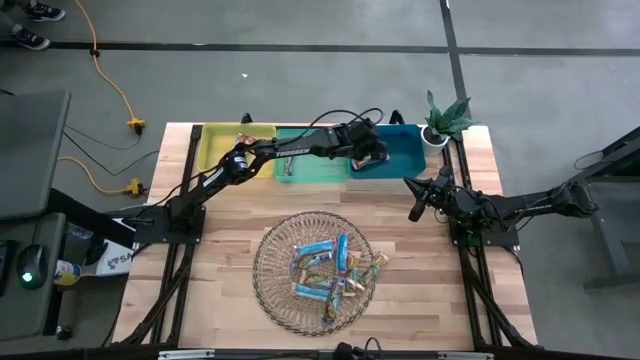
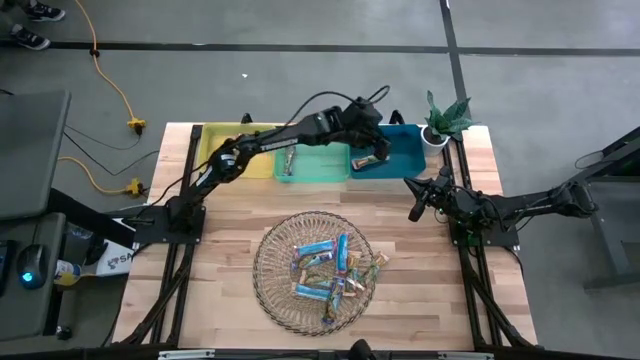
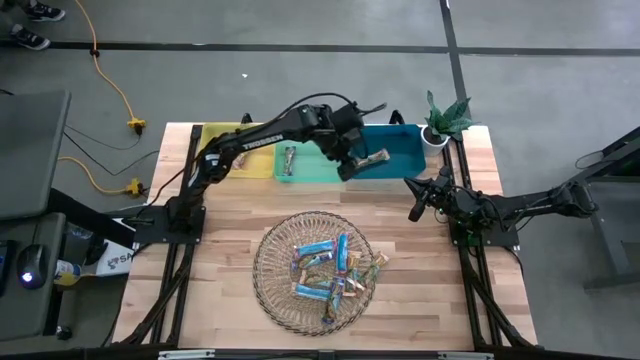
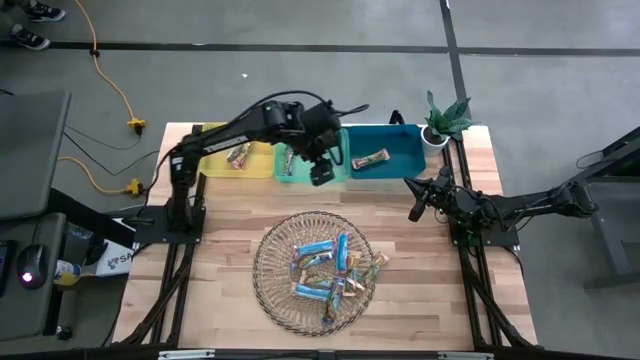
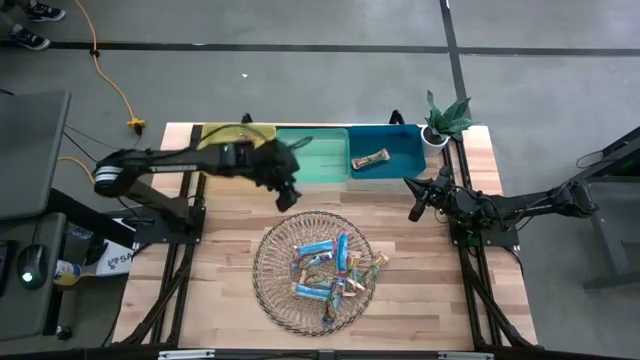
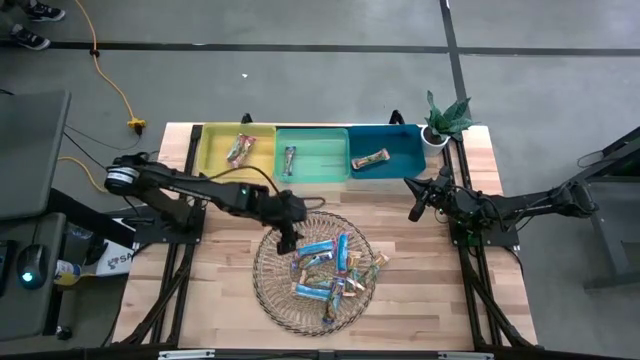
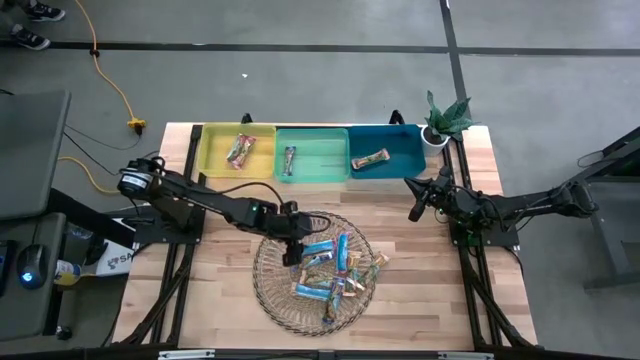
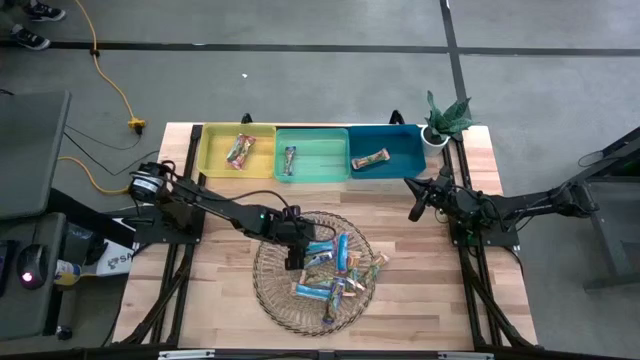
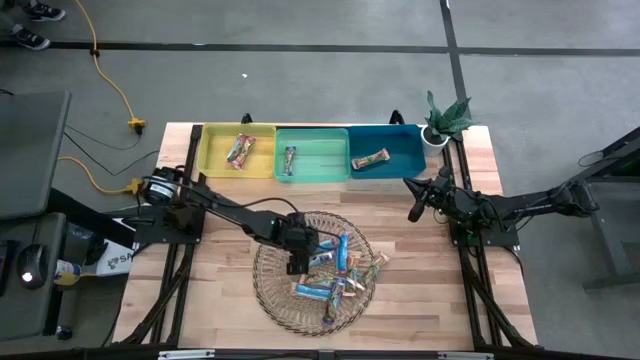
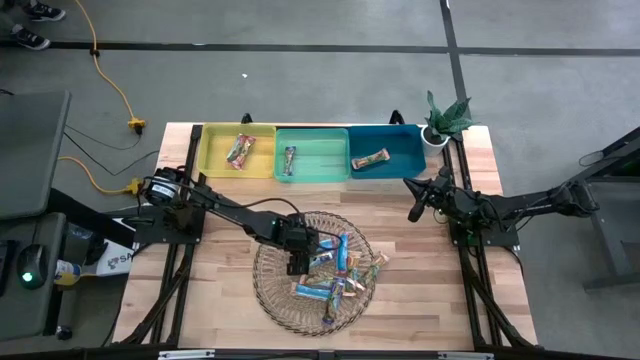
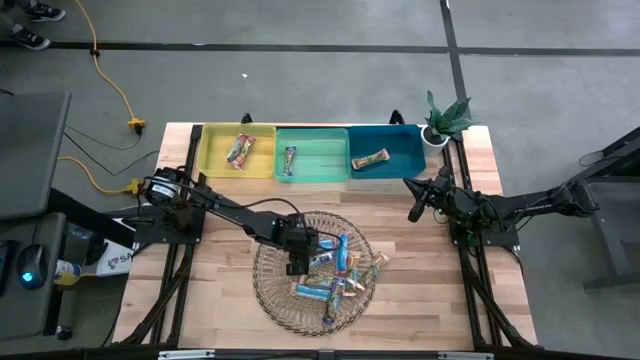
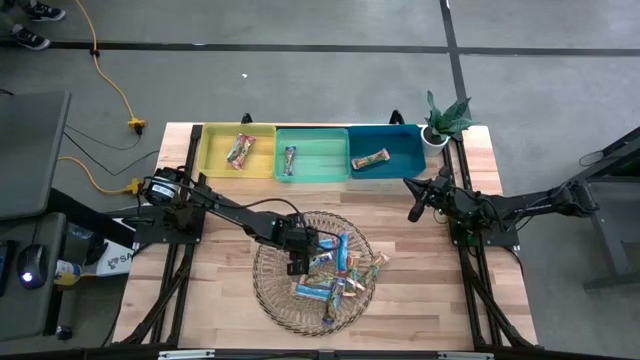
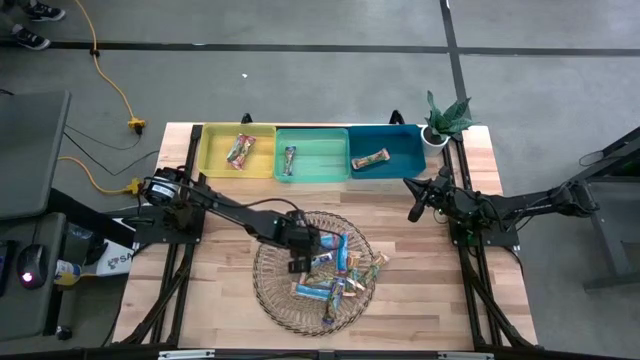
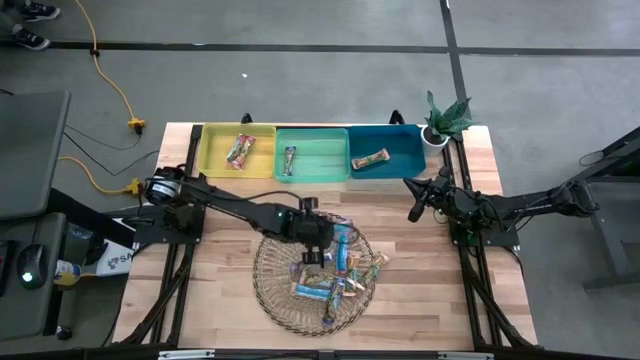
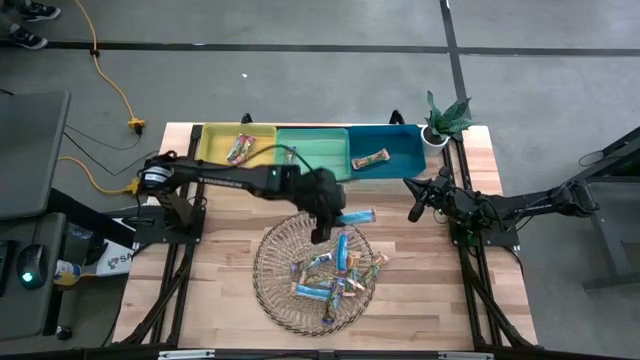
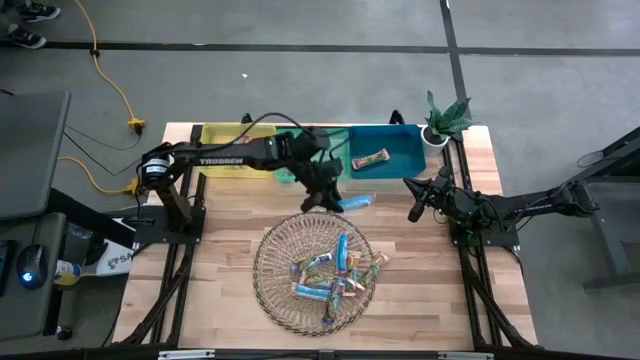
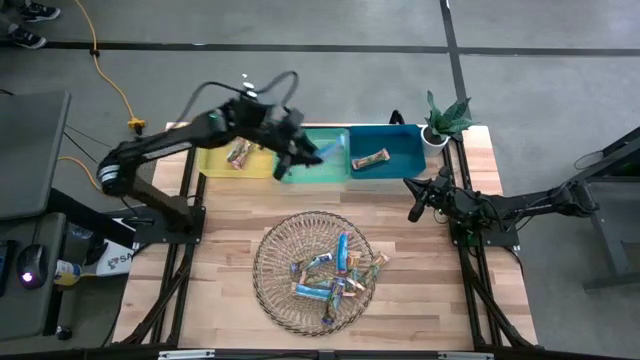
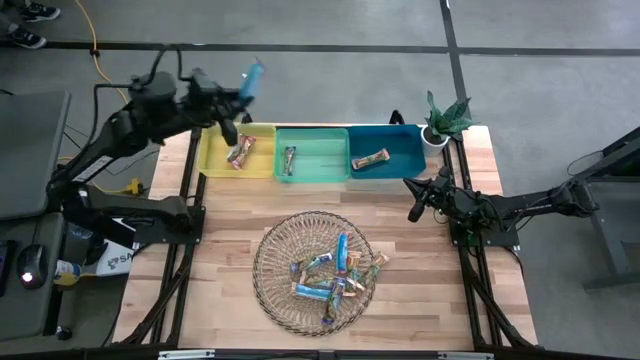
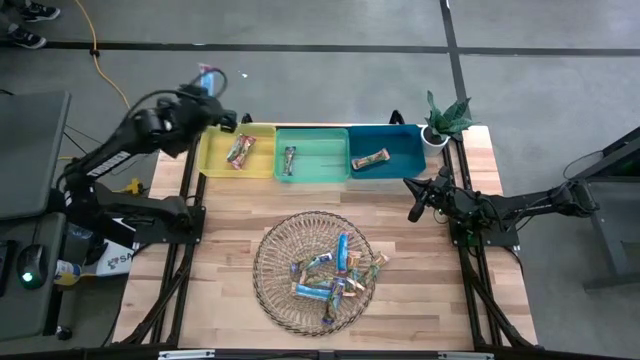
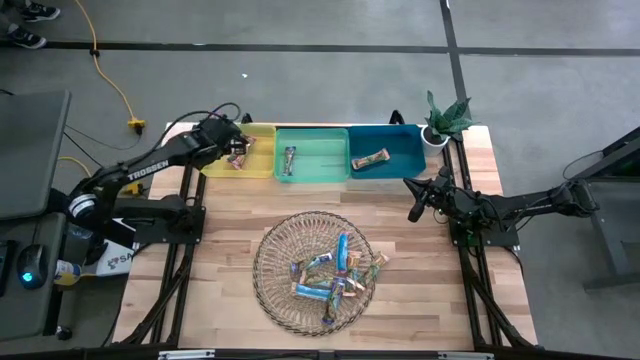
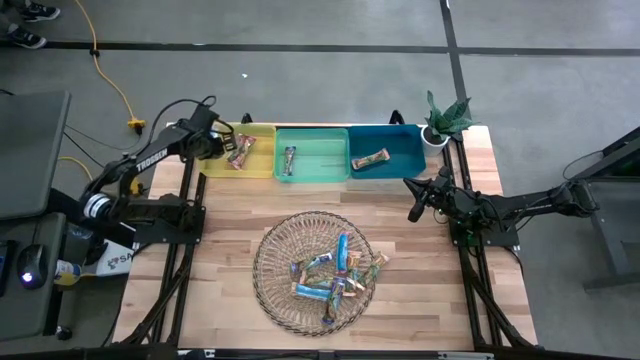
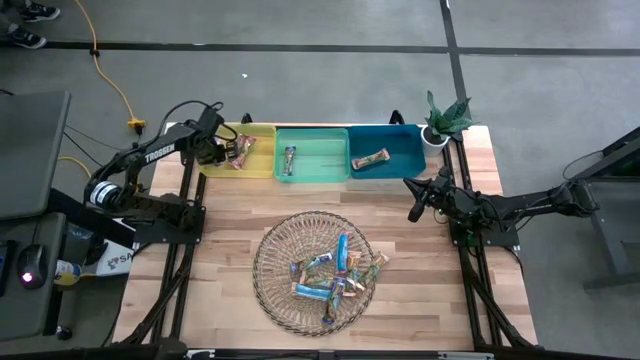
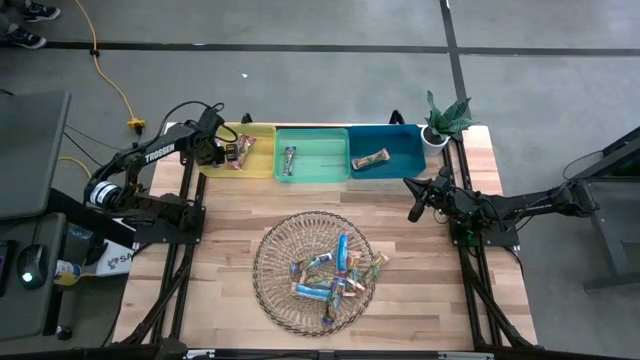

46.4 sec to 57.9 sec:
Task: Pick and place Granola Bars by type
Put the red granola bar into the yellow bin

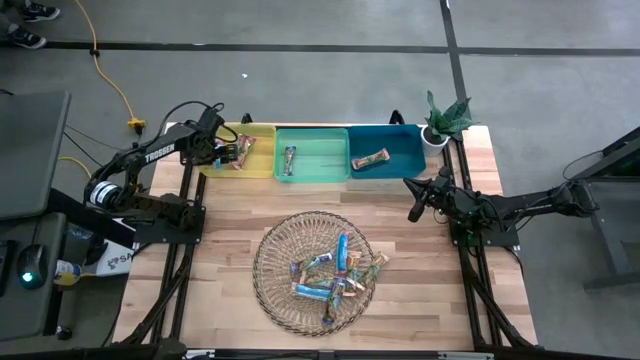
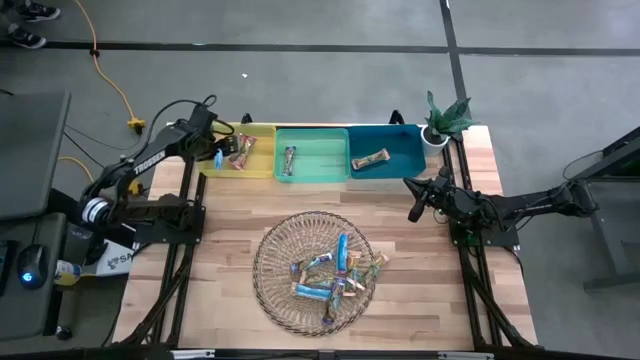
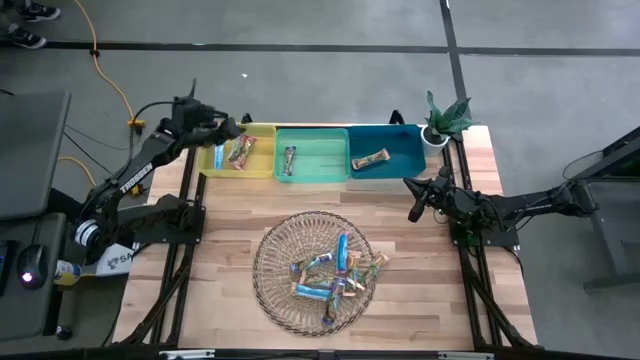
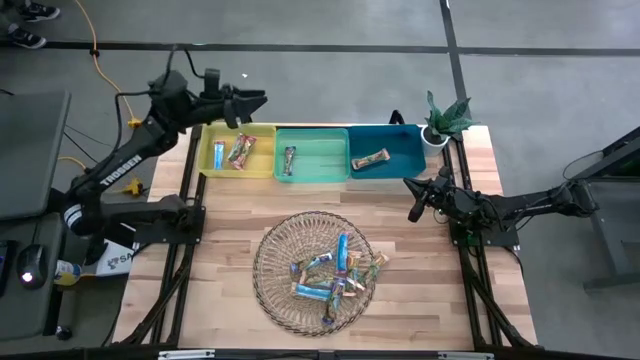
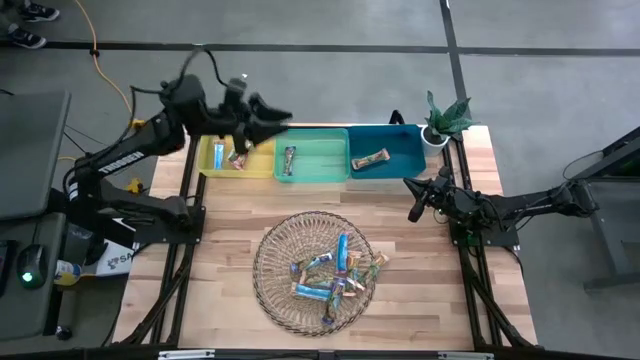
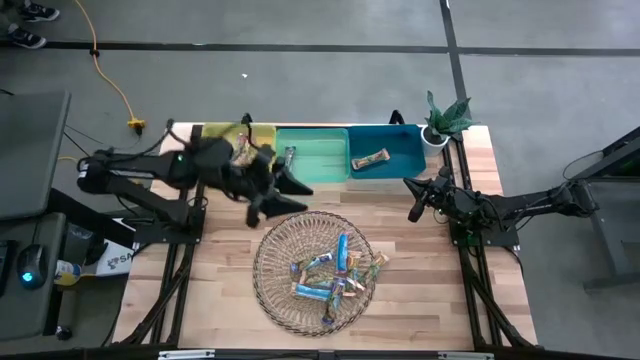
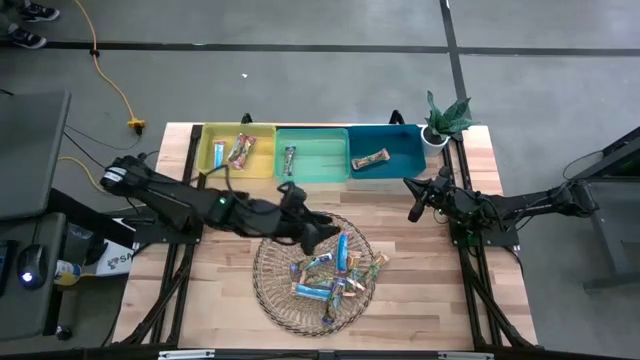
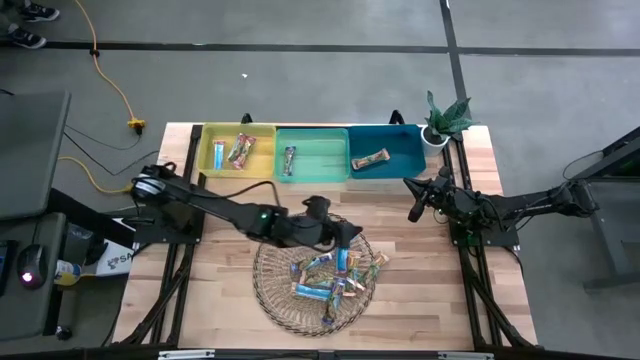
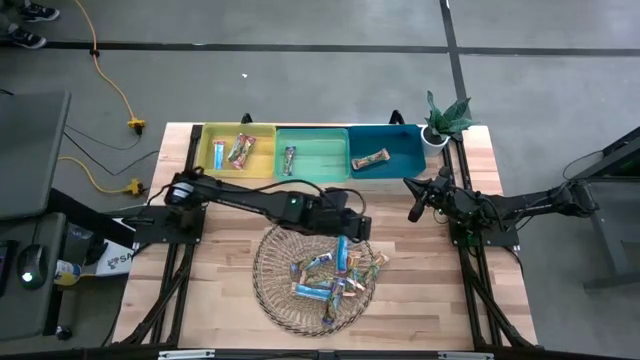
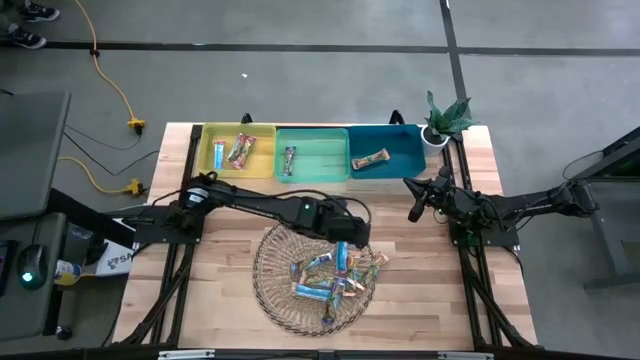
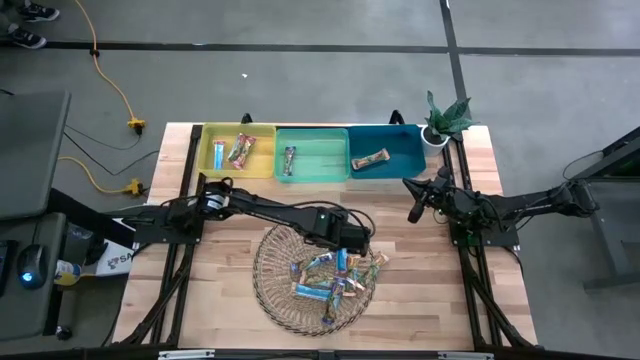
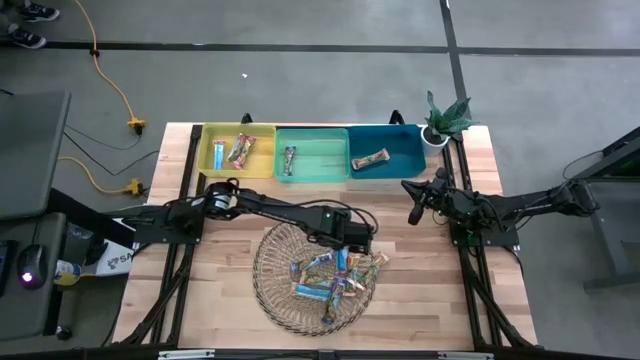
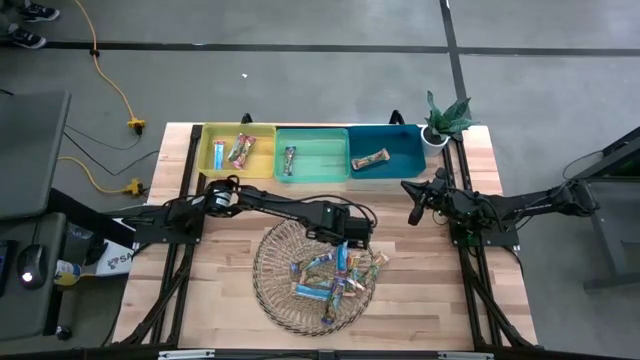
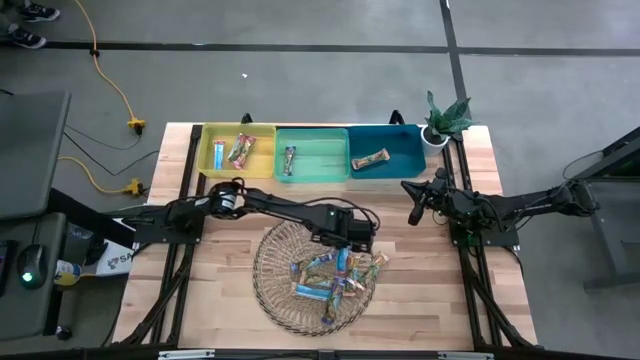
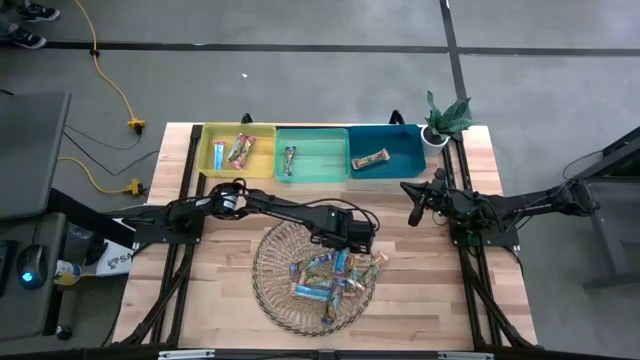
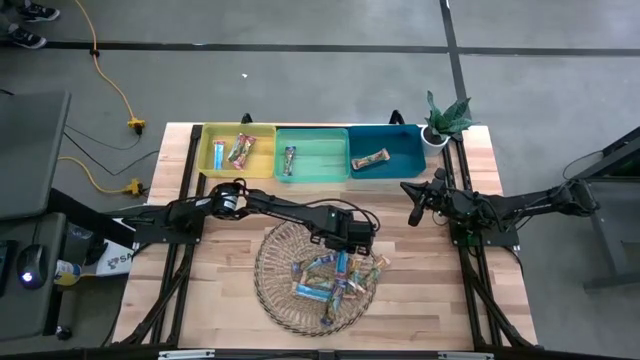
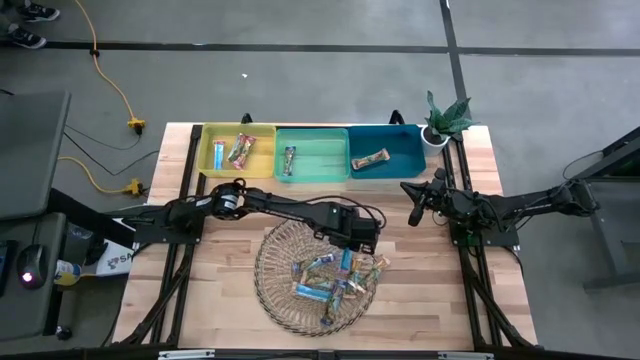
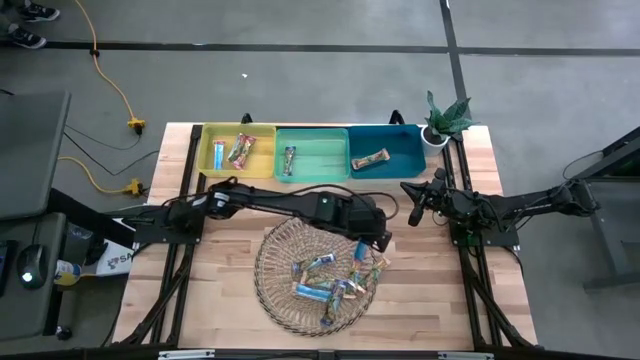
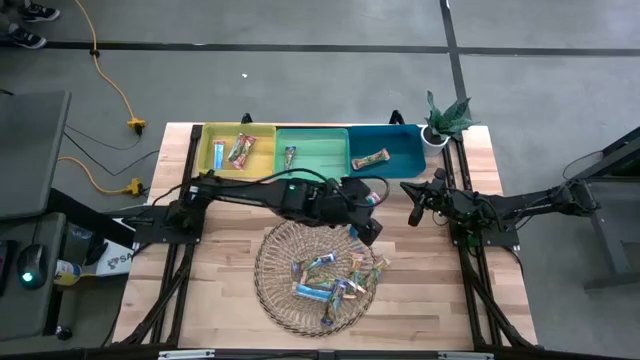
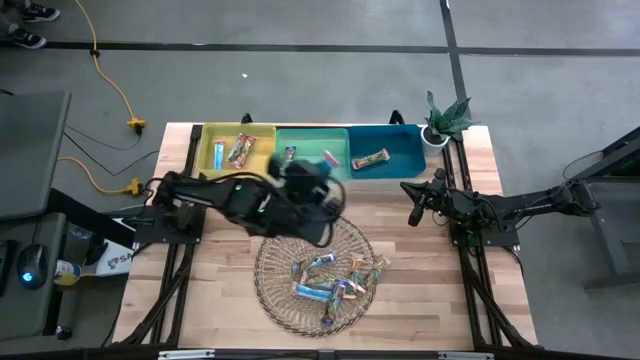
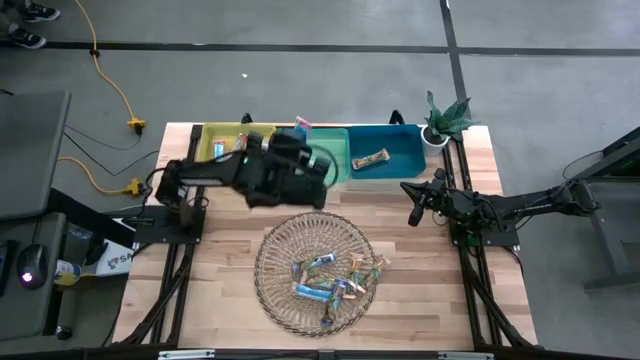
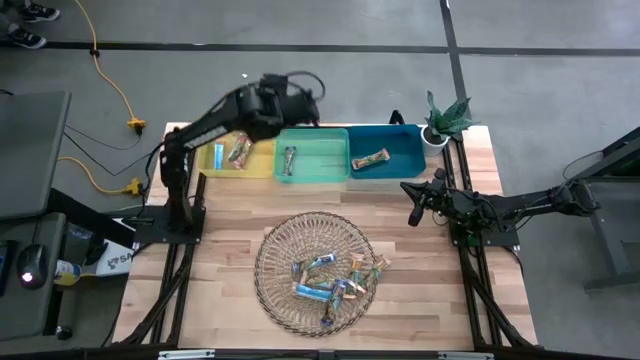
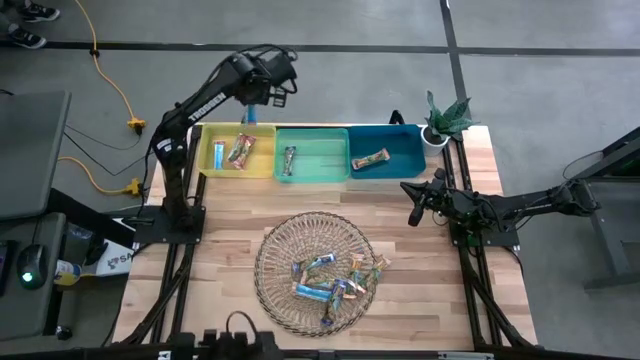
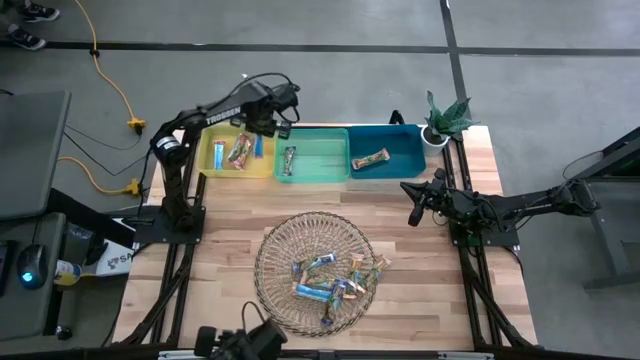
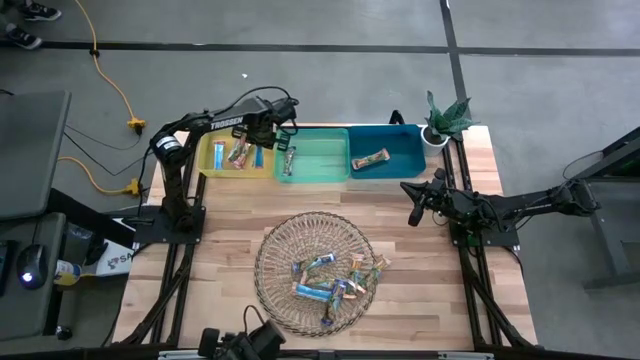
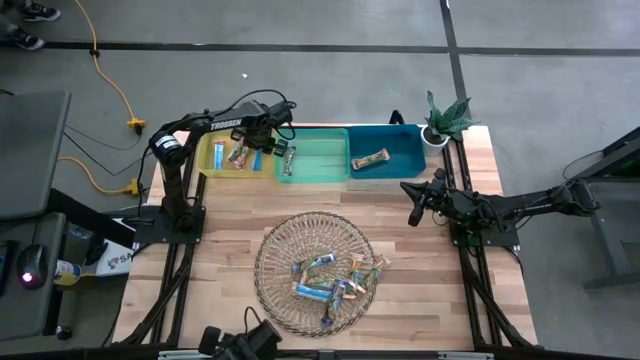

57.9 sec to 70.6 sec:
Put the red granola bar into the yellow bin
